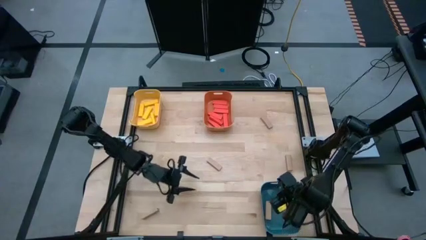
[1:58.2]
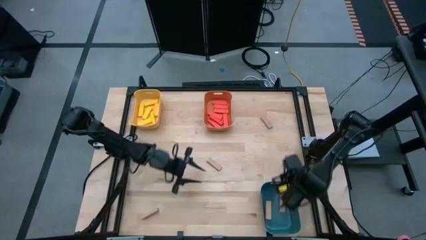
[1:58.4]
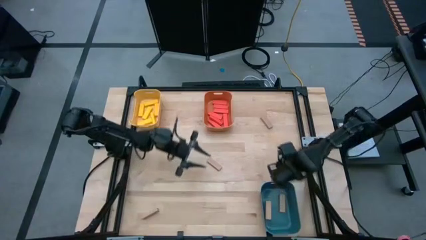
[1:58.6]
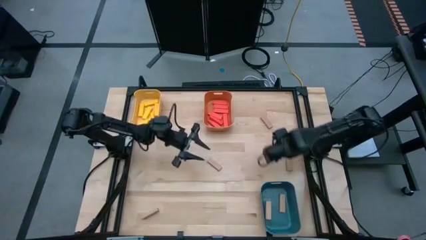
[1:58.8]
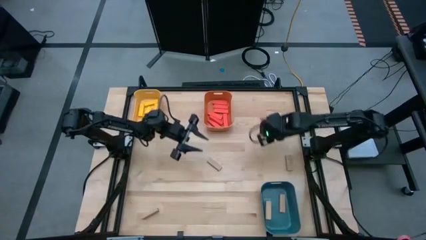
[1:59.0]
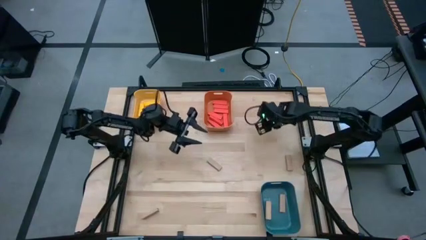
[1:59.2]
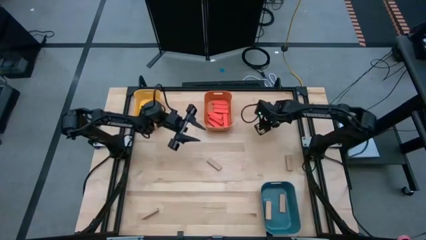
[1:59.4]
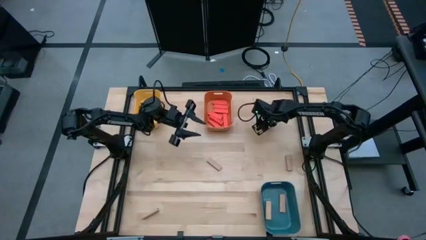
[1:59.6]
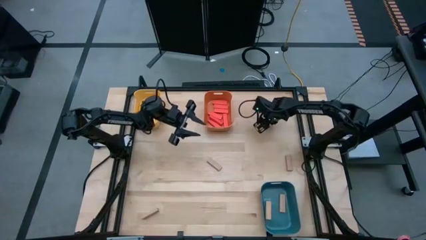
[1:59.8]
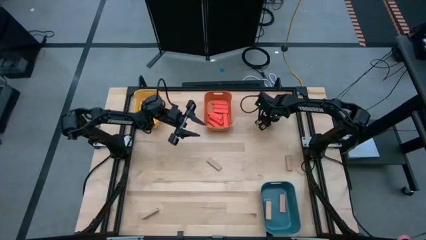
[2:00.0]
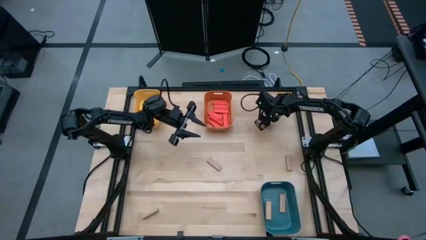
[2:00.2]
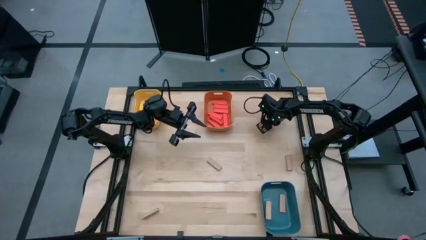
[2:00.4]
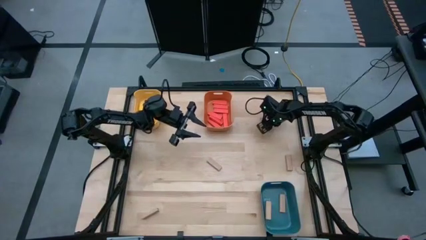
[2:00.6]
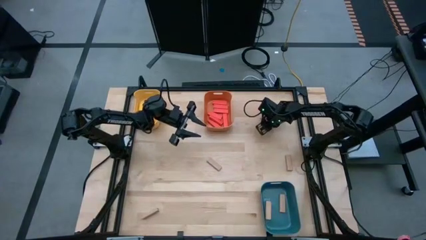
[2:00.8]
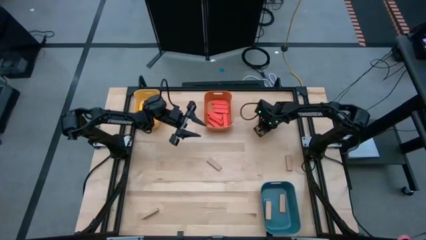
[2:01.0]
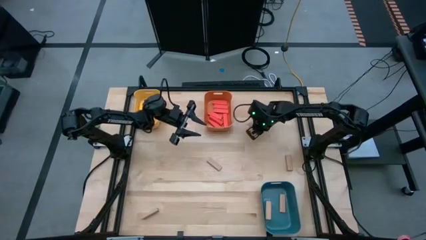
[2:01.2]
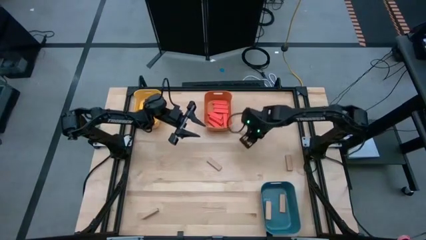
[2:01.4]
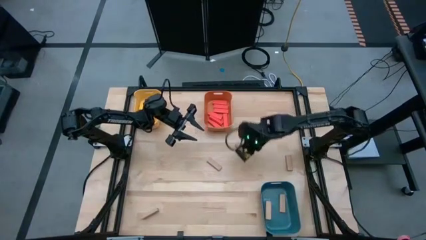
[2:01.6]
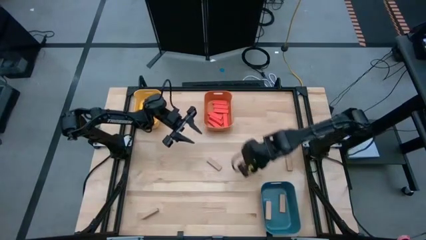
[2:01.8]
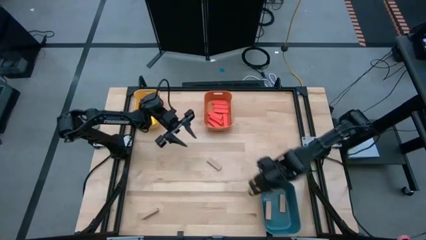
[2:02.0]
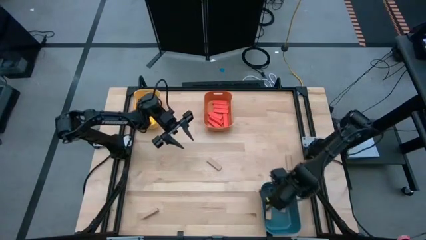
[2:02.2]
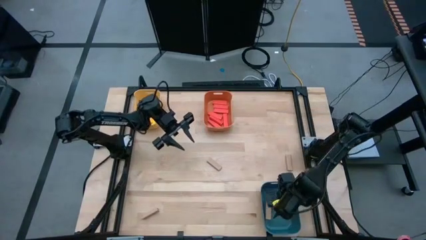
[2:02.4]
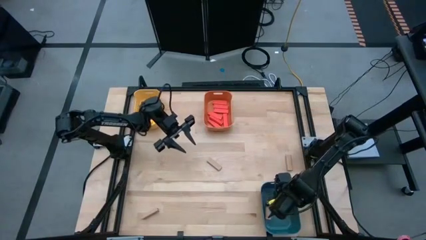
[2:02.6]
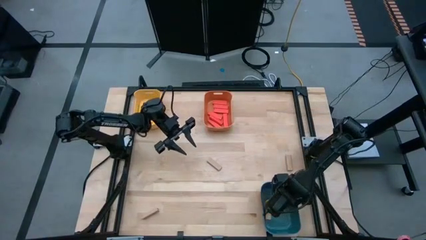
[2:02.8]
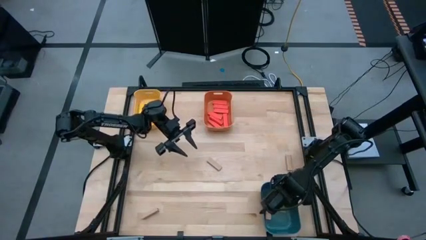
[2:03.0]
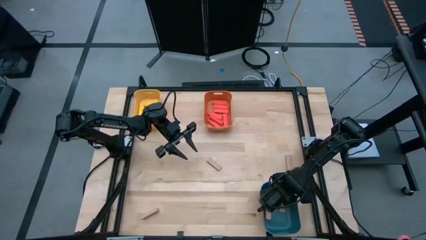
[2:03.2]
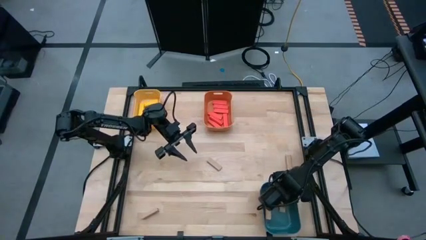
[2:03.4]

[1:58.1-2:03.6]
Task: Sort blocks
Put the brown block into the blue bin

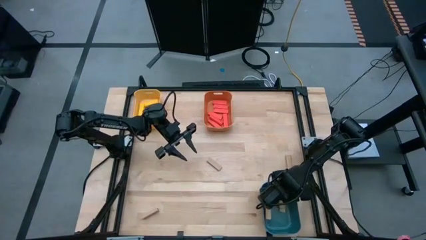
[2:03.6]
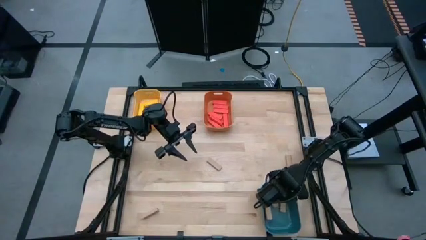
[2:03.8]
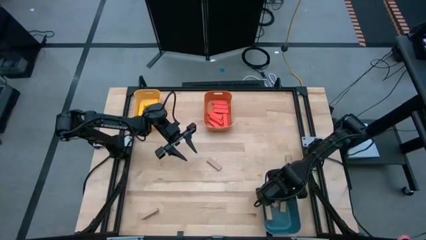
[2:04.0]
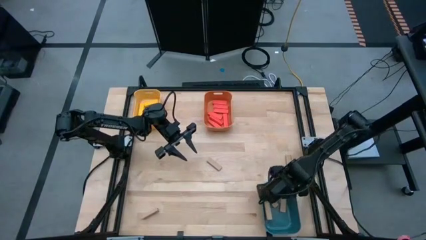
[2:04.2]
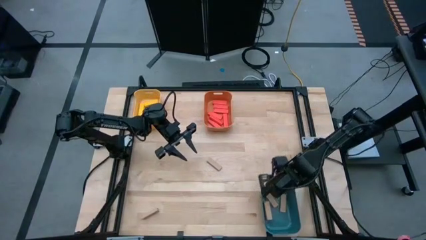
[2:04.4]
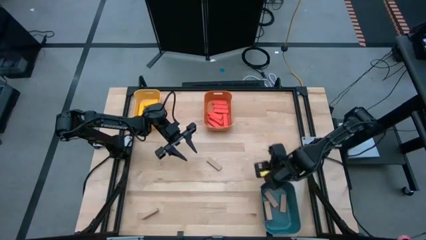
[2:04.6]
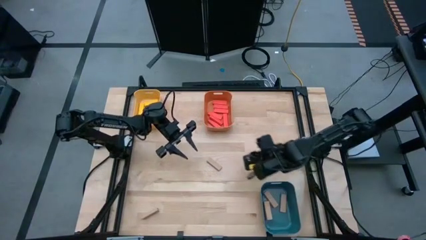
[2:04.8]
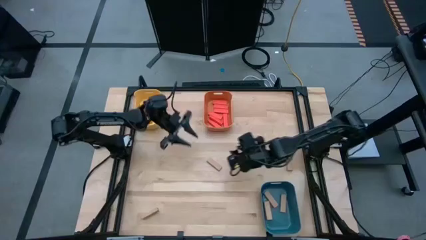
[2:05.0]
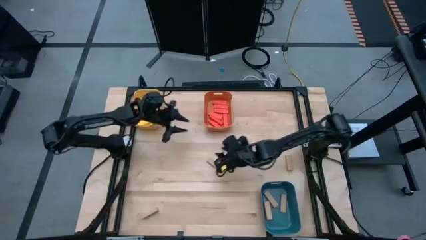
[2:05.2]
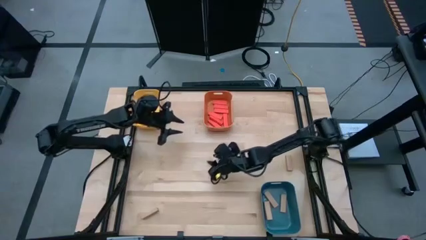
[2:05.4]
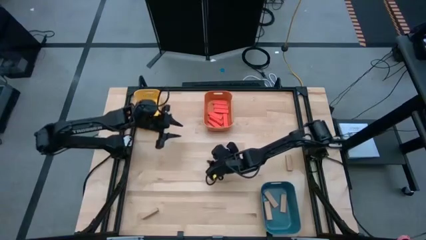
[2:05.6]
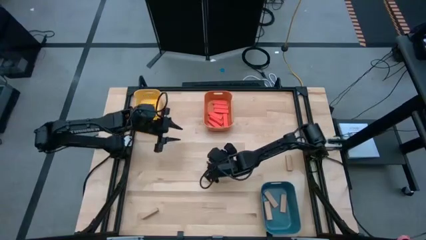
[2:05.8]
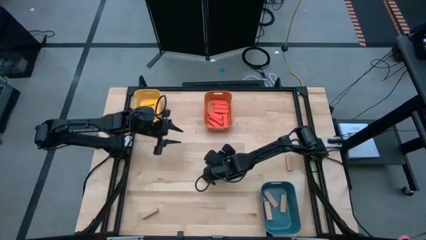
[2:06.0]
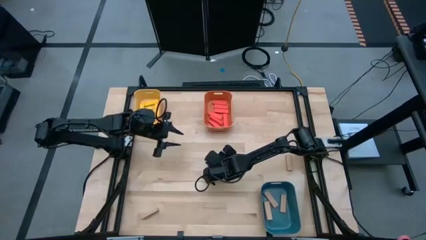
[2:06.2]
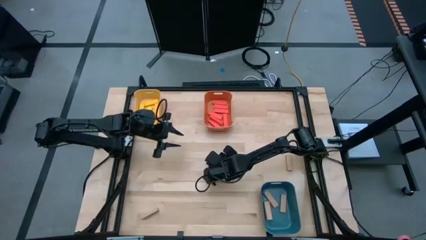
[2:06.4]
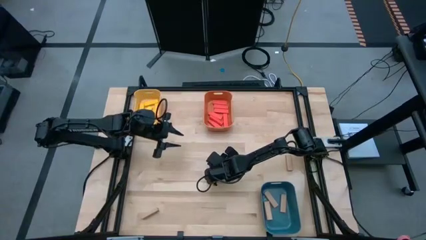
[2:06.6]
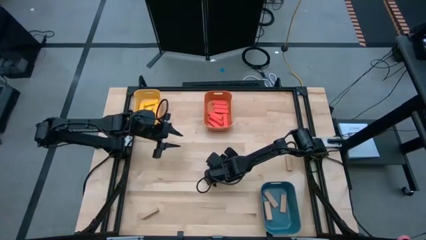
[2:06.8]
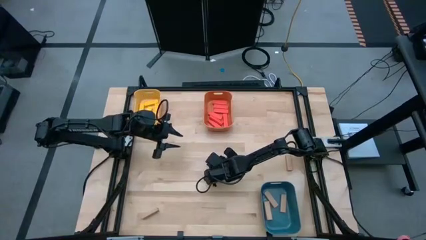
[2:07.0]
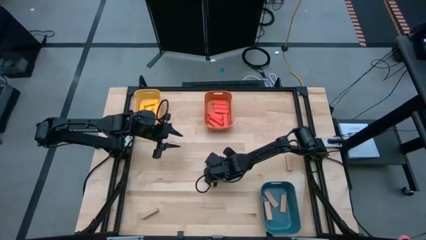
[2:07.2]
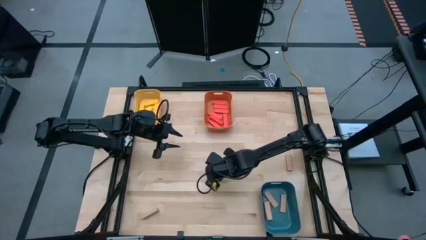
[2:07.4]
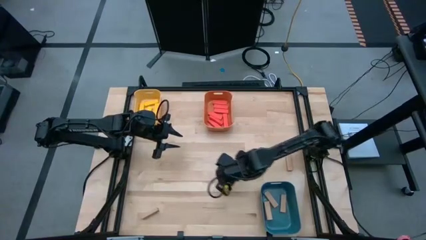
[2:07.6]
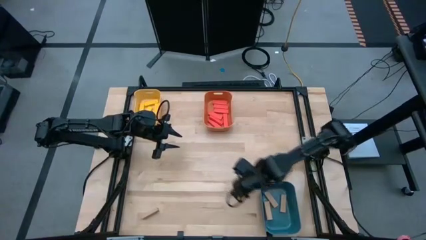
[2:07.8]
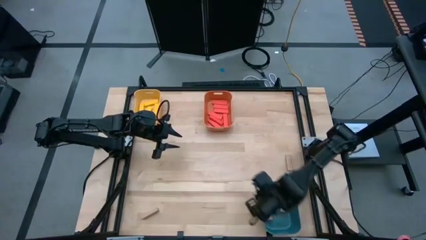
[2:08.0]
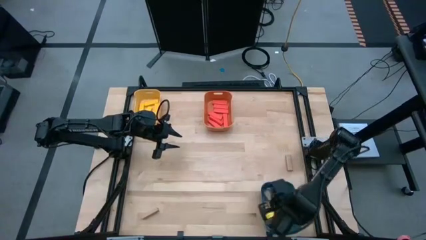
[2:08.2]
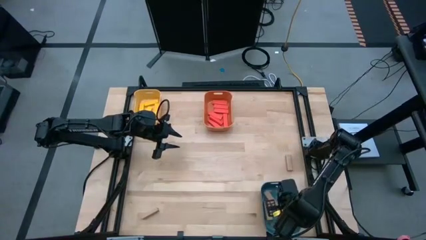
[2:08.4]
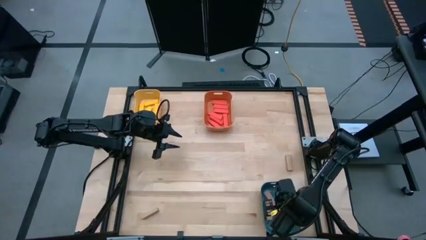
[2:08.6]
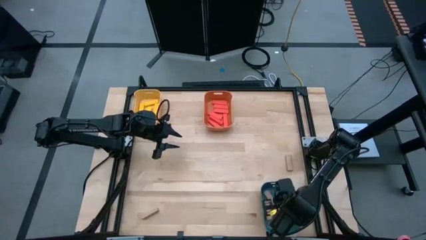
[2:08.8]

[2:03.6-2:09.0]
Put the brown block into the blue bin

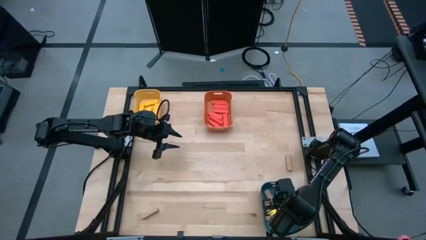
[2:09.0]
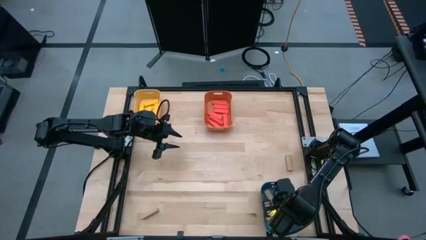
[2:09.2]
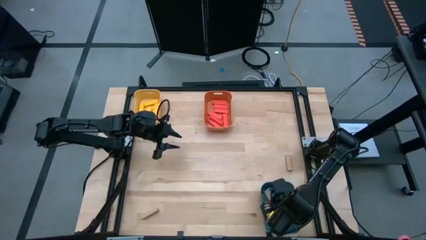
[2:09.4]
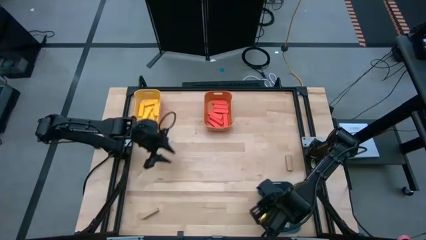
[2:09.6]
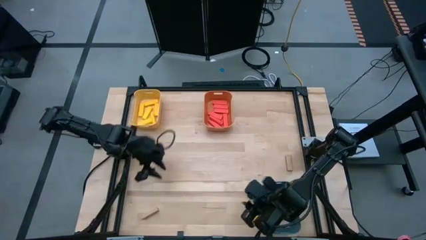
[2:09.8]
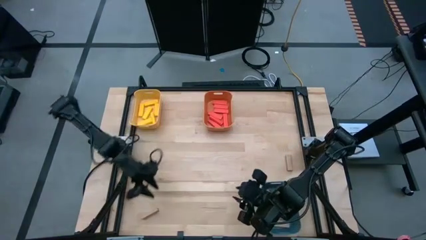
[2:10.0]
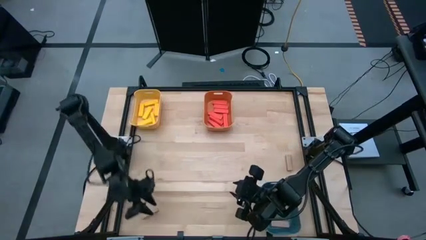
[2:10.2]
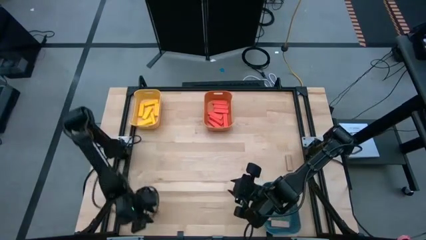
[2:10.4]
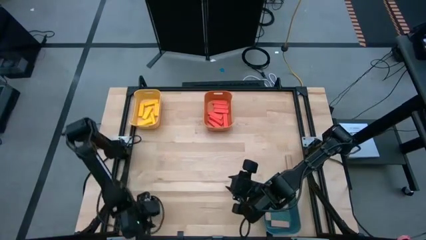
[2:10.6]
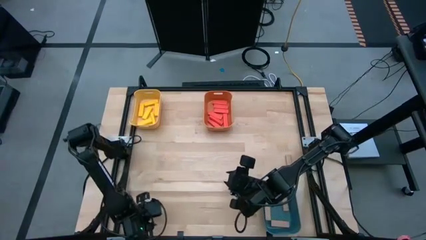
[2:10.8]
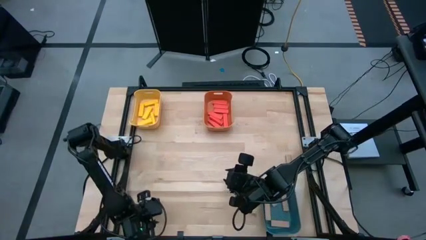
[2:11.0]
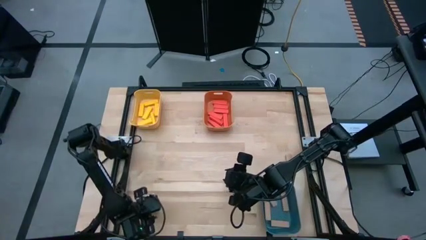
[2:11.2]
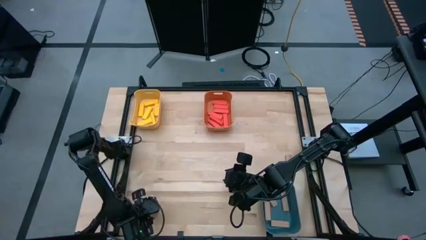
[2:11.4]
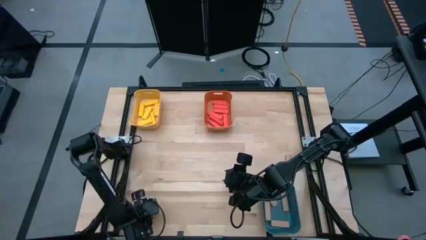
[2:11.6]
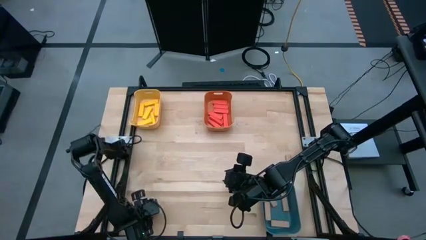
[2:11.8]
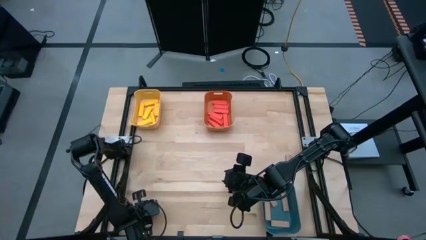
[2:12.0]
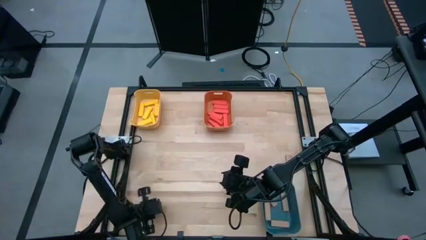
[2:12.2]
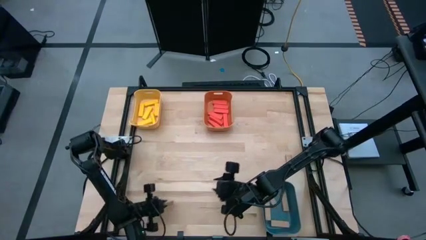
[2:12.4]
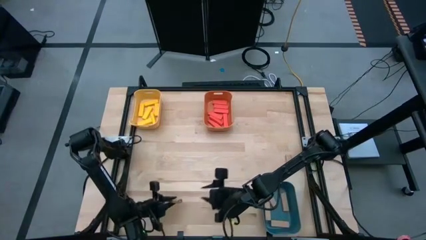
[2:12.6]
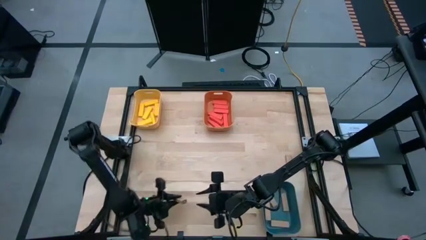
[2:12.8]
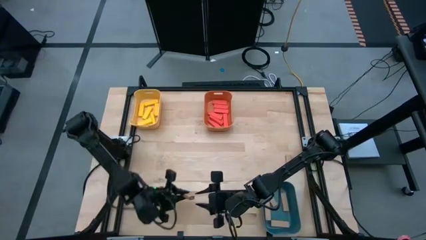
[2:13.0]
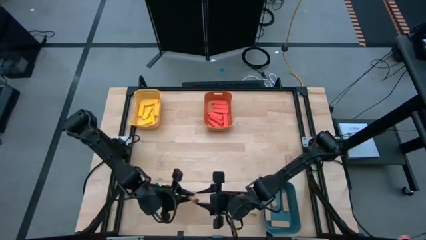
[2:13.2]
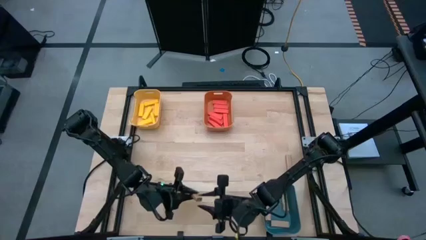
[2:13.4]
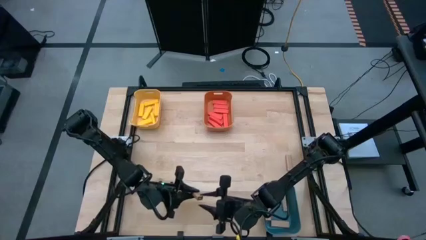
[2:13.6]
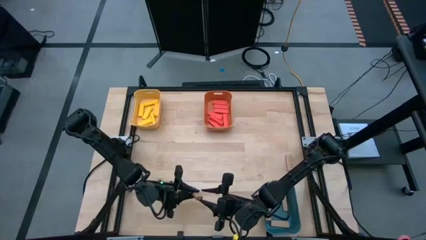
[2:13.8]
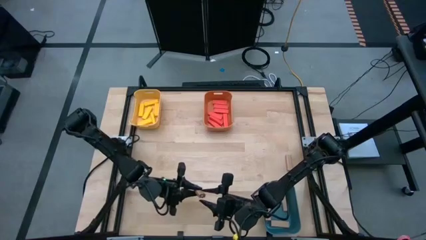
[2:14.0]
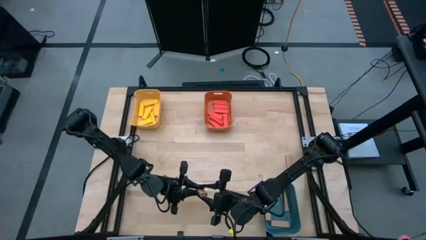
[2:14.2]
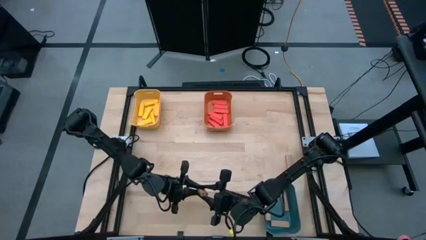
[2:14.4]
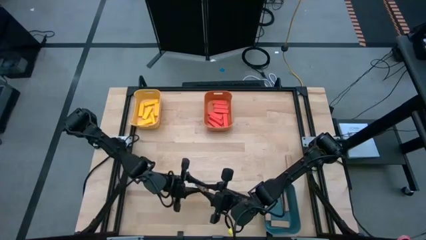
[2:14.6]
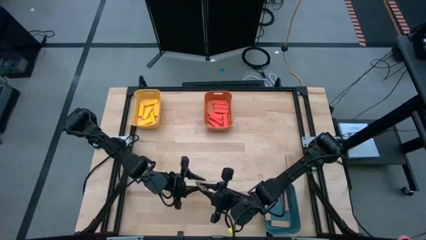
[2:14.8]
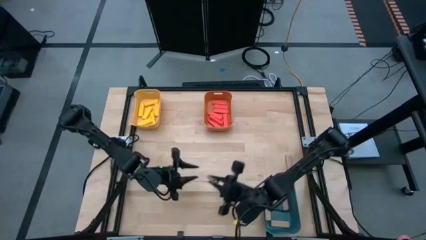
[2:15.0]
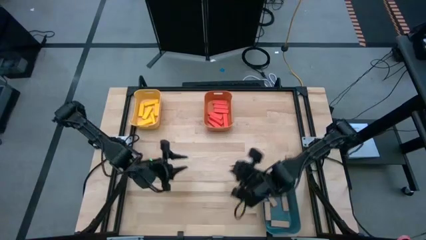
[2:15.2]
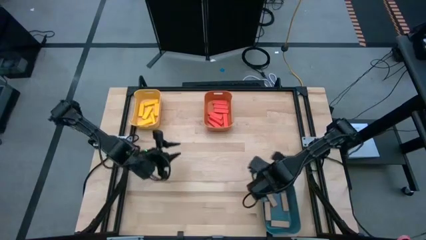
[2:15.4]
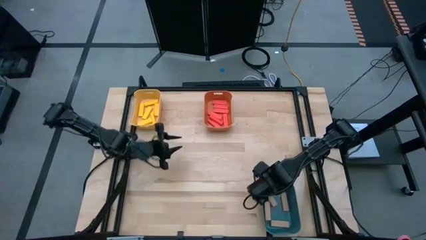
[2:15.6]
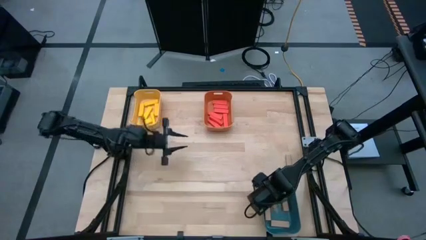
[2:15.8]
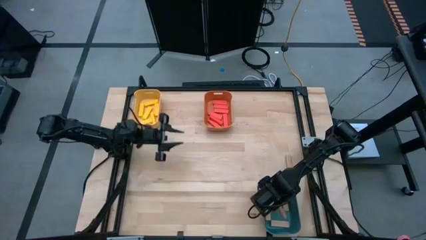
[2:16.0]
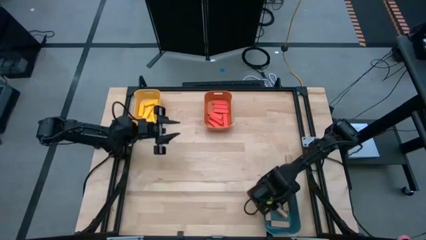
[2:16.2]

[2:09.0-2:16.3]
Put the brown block into the blue bin
